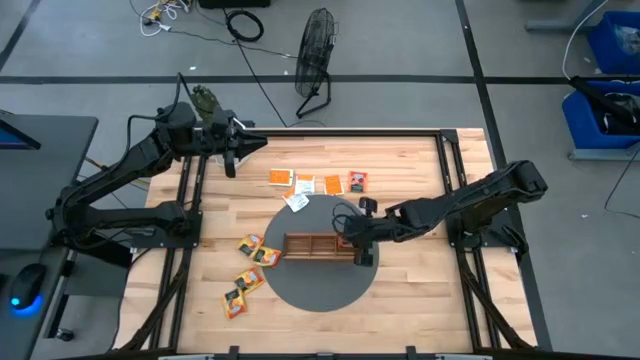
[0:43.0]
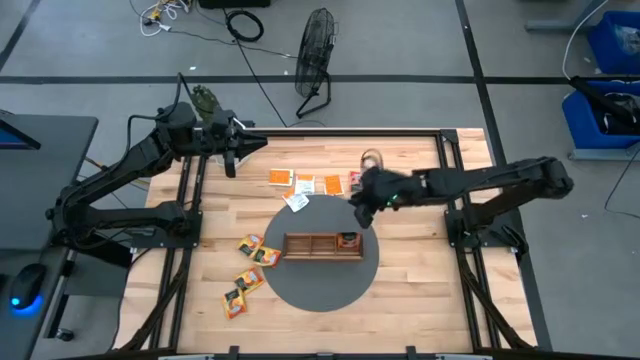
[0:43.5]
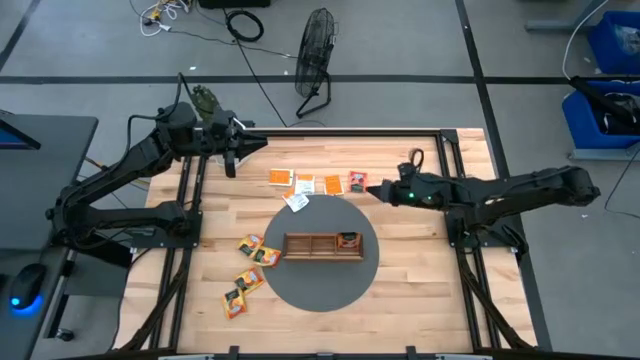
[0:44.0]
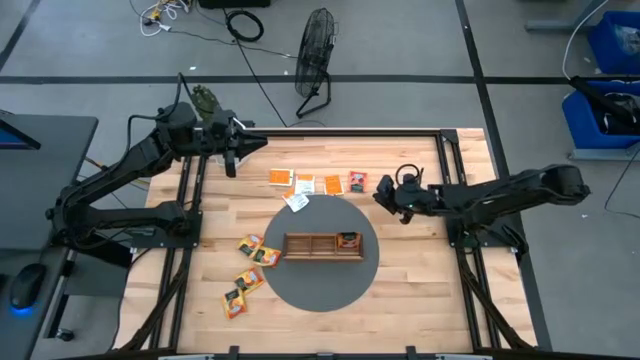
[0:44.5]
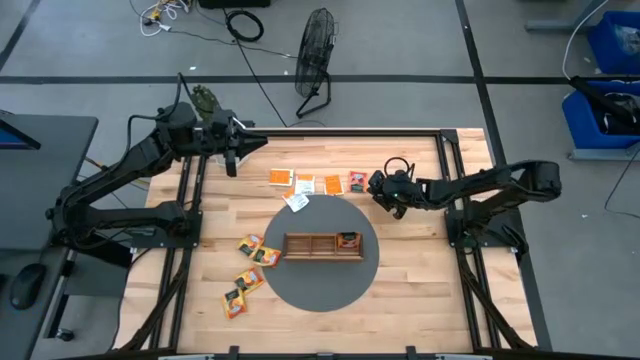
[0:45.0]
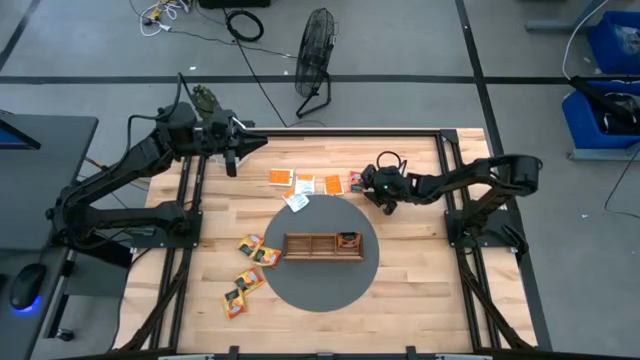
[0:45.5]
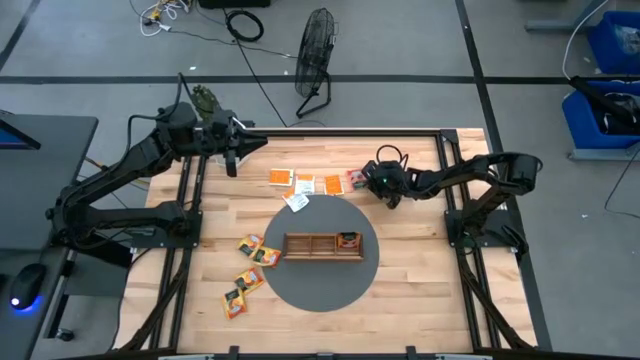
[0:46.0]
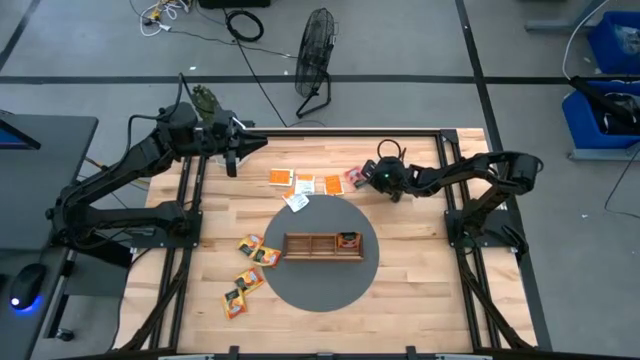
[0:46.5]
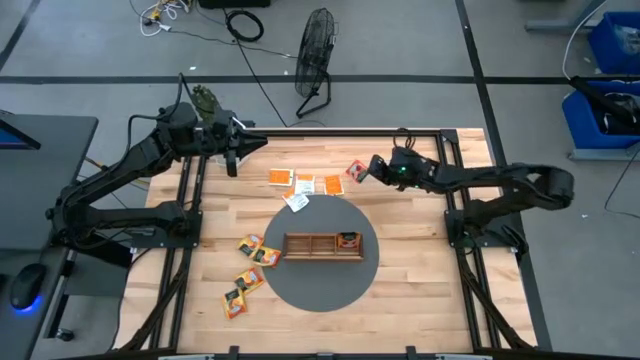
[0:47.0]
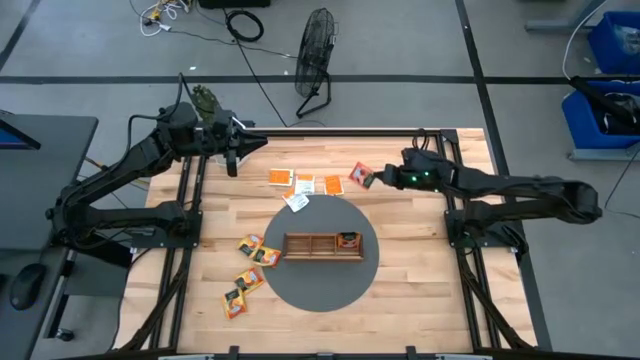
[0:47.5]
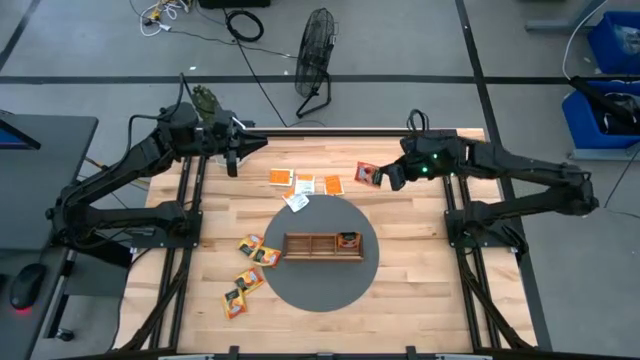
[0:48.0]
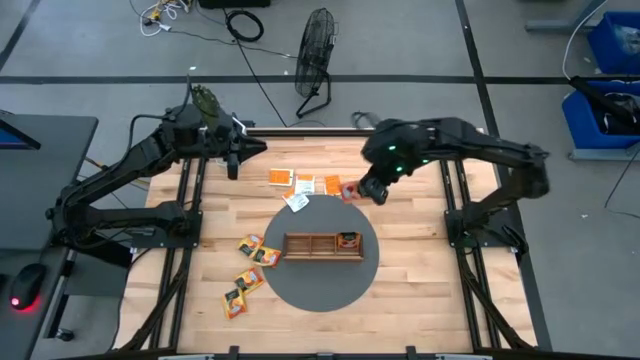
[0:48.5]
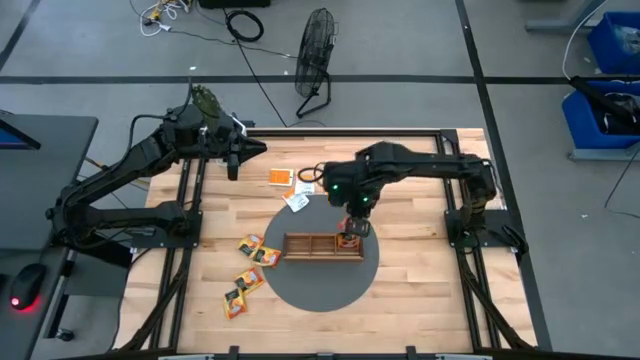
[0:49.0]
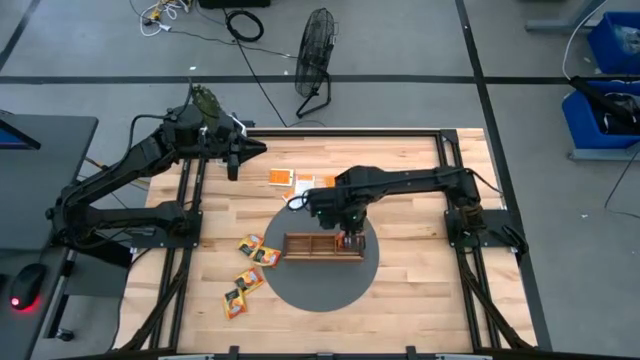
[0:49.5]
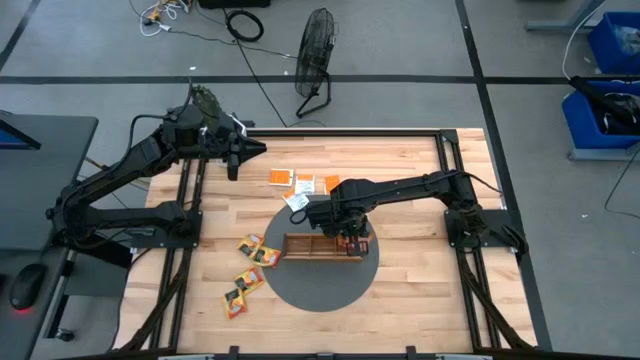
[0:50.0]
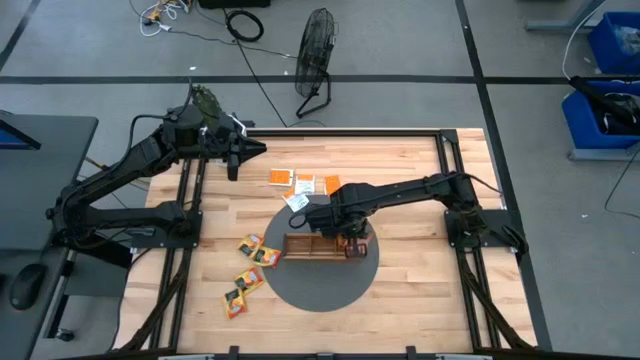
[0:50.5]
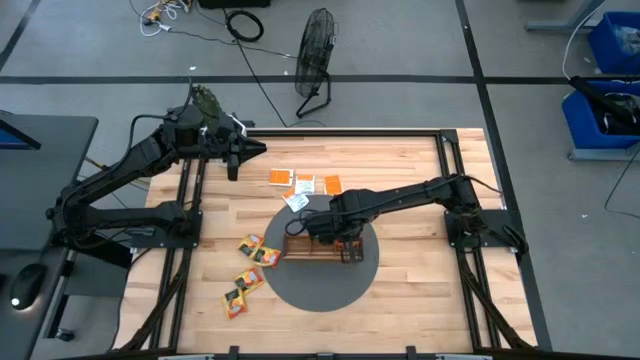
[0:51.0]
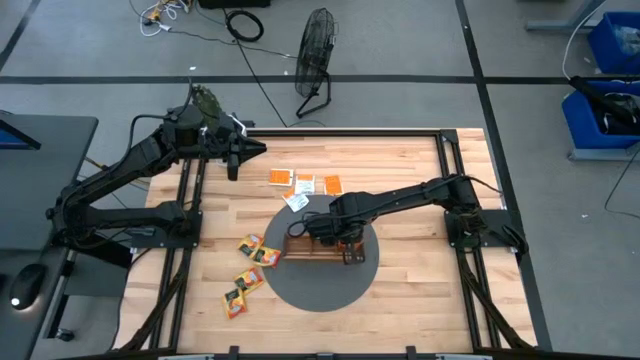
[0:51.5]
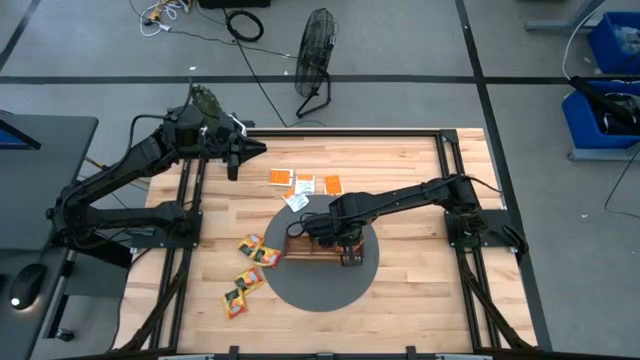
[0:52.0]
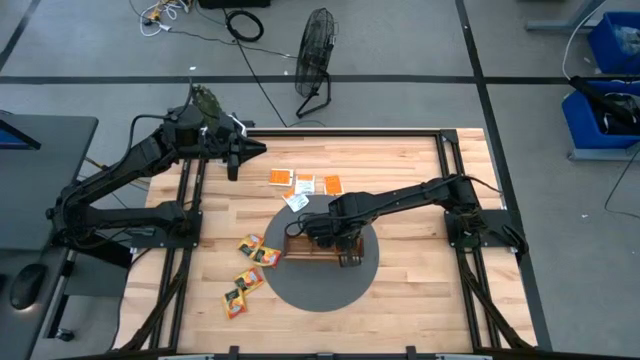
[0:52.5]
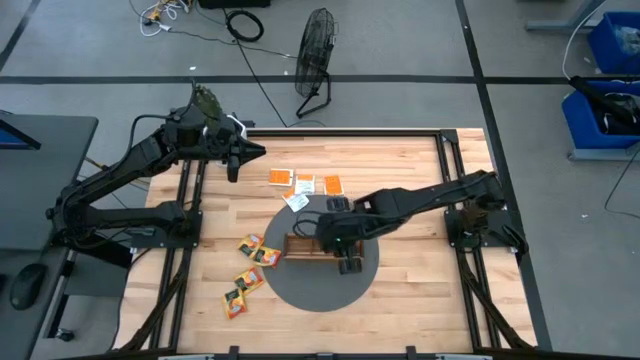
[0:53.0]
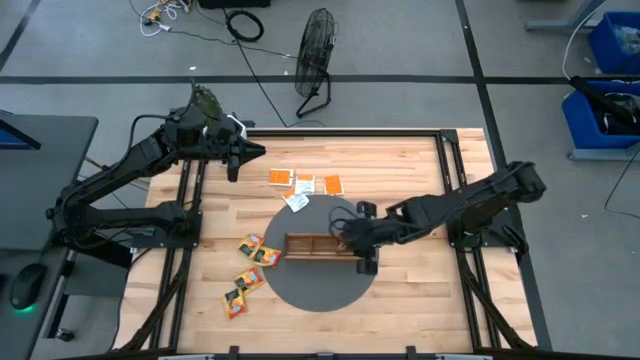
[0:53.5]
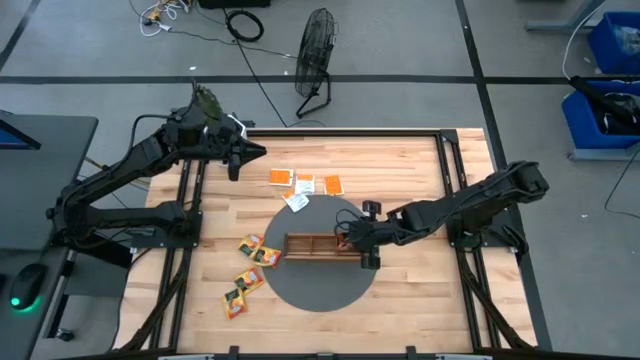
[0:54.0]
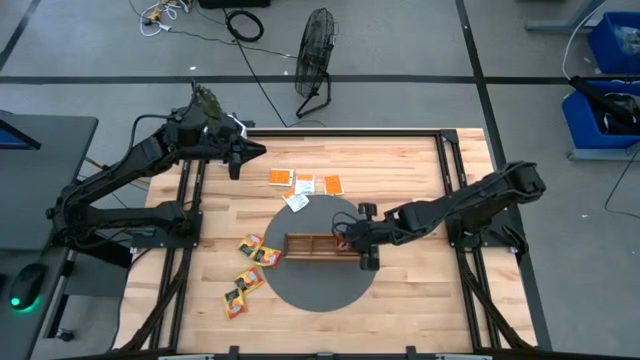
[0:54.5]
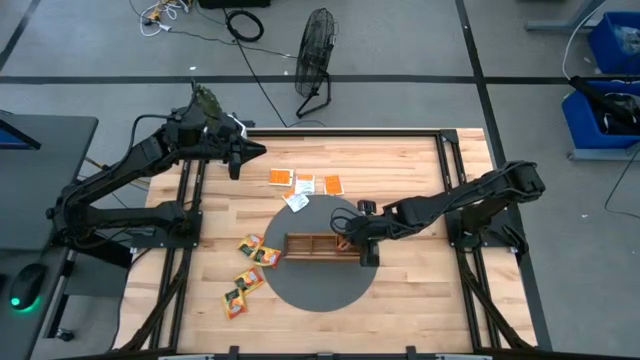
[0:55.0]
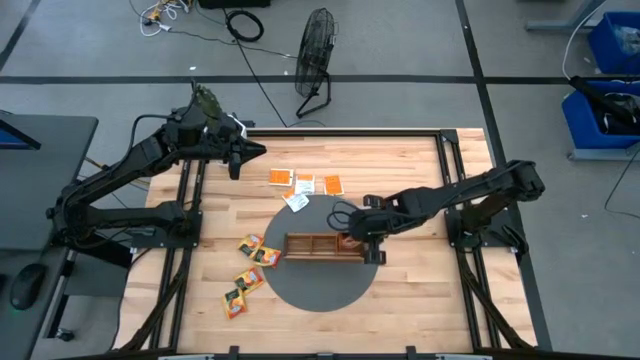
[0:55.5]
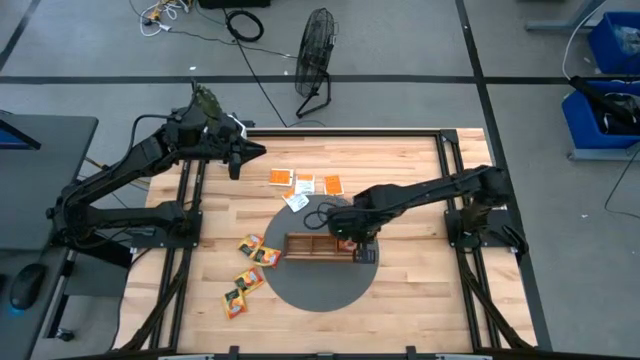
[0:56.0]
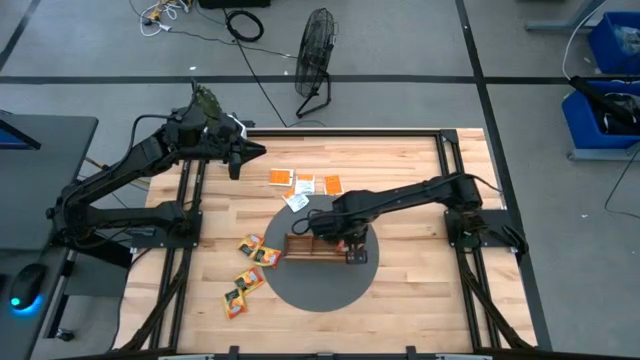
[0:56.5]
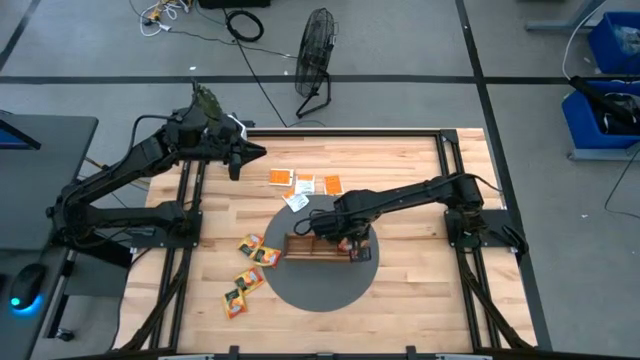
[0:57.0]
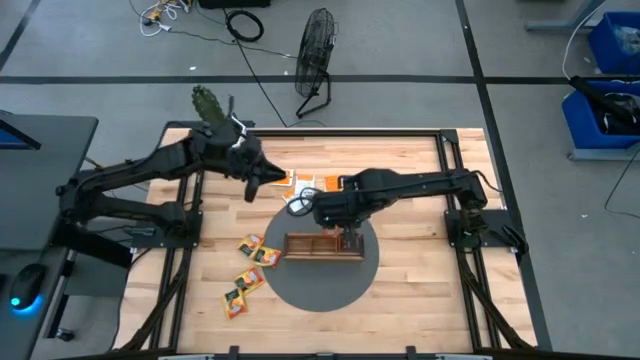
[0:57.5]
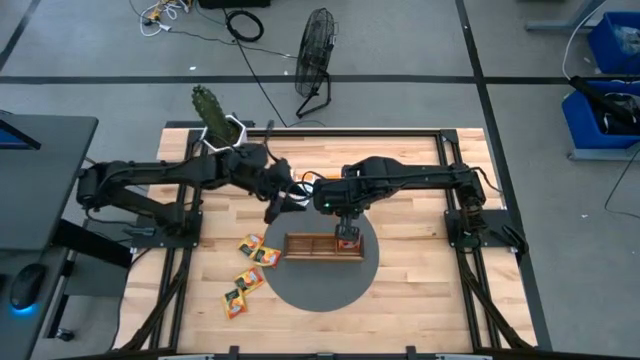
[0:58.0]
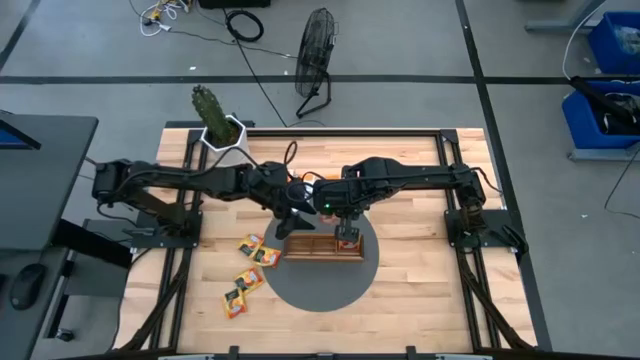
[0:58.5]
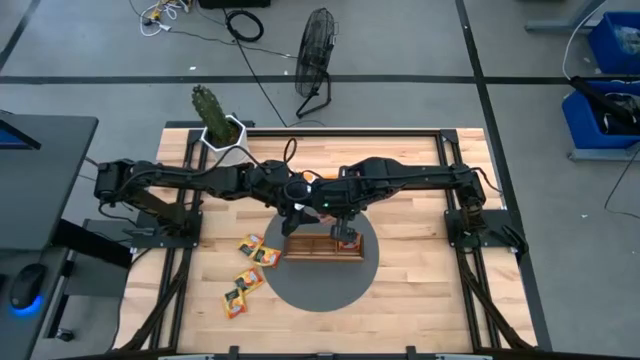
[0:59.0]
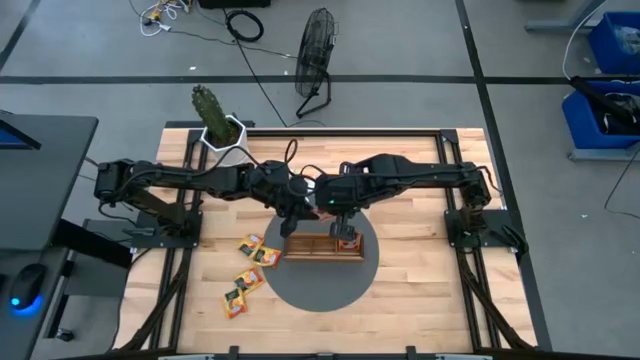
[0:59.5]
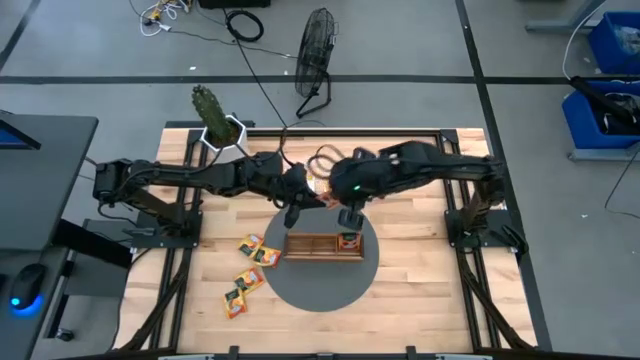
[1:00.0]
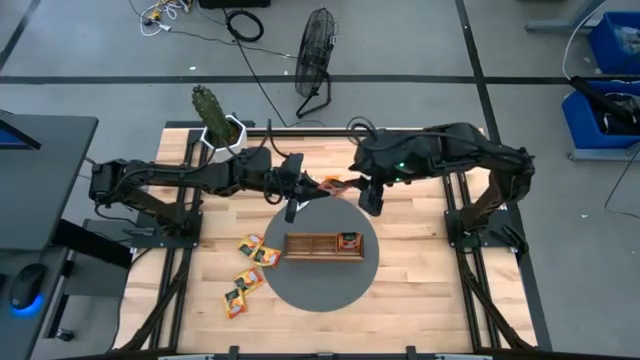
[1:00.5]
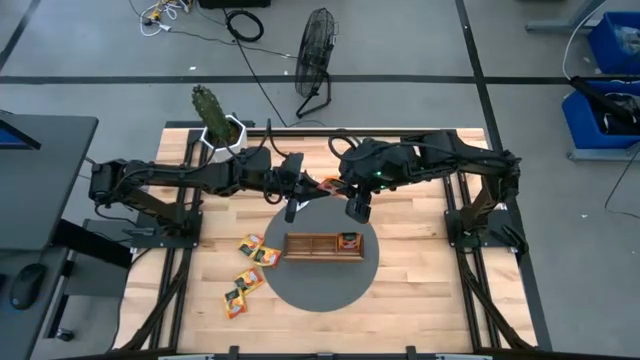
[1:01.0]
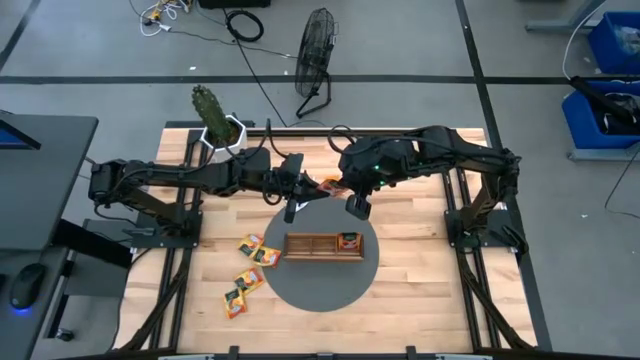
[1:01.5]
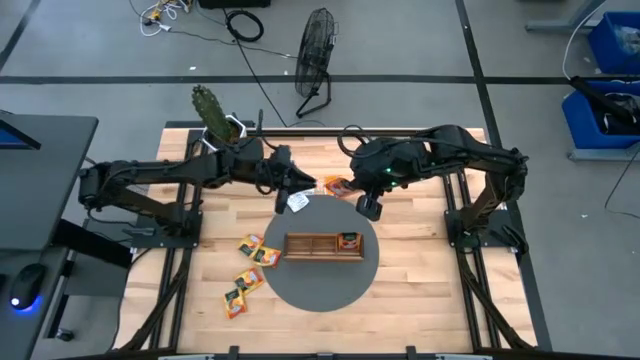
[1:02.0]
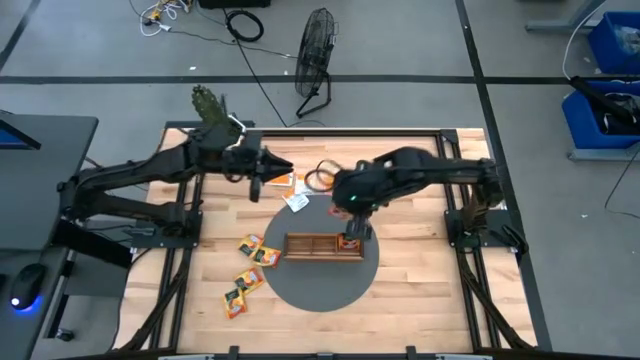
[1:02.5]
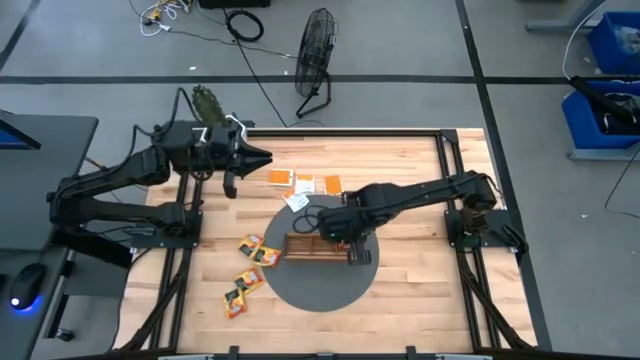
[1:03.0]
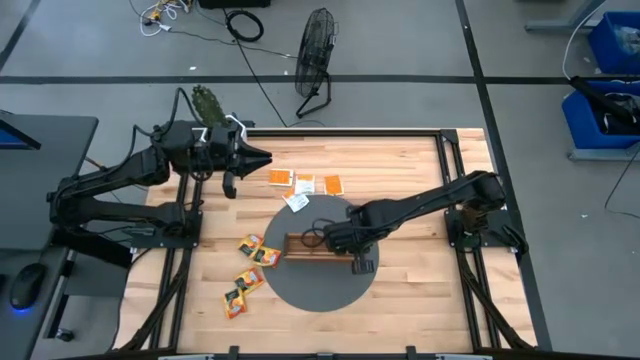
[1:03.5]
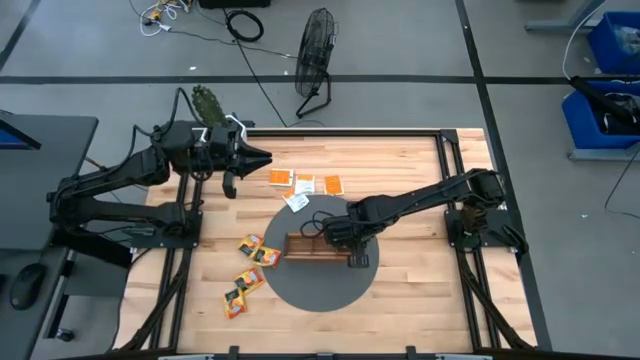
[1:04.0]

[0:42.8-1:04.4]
Task: Pick & Place Tea
Put the red tea bag into the right section of the wooden organizer
